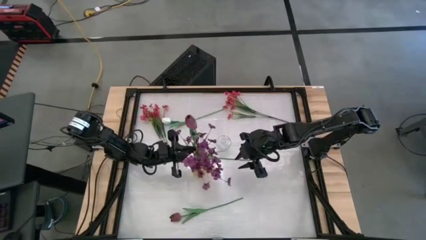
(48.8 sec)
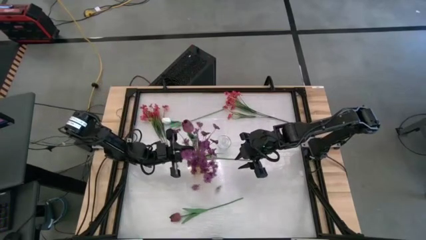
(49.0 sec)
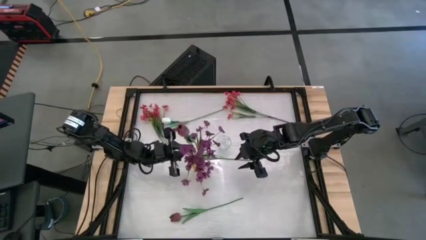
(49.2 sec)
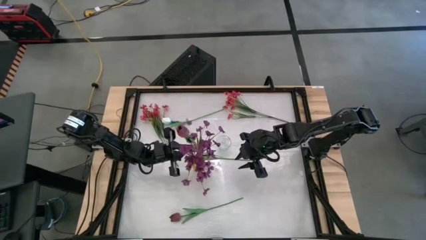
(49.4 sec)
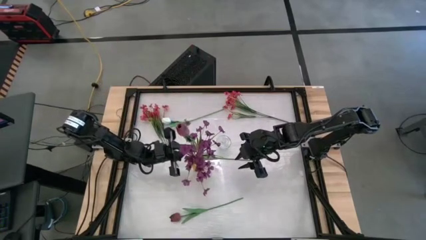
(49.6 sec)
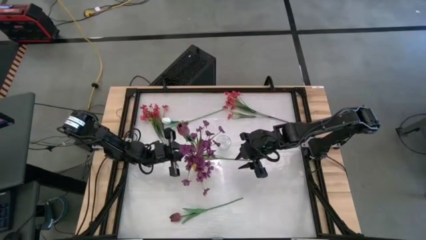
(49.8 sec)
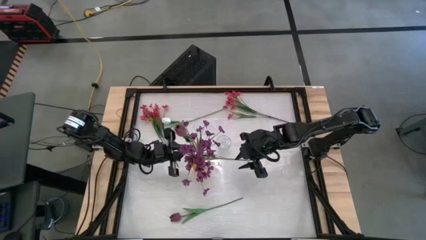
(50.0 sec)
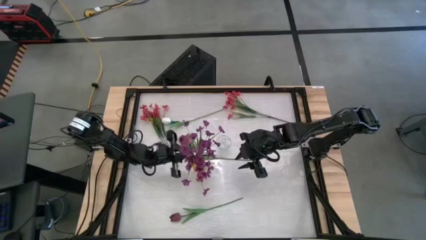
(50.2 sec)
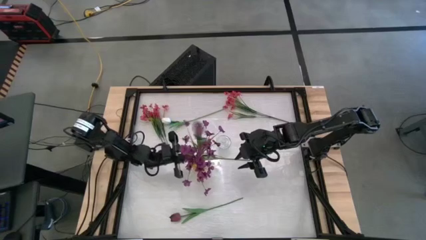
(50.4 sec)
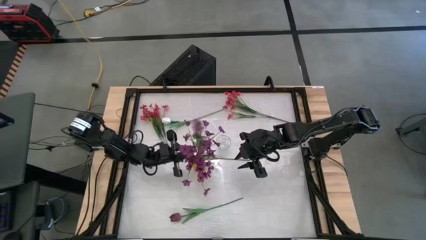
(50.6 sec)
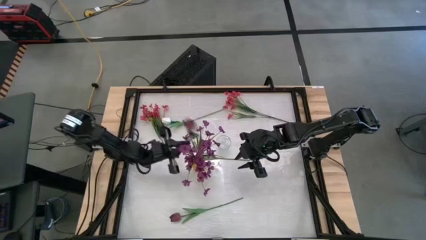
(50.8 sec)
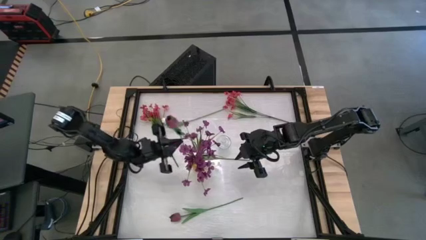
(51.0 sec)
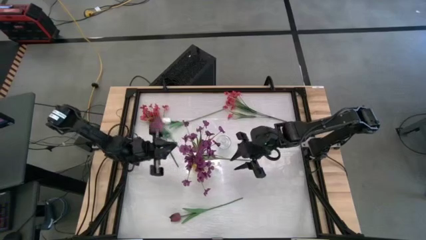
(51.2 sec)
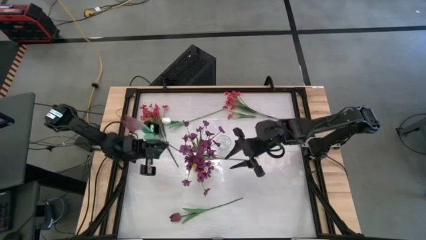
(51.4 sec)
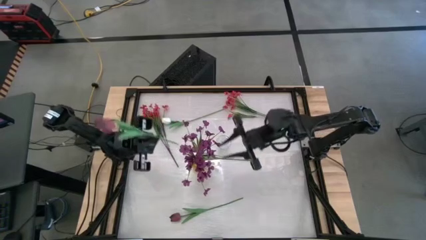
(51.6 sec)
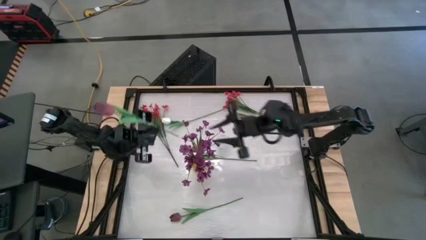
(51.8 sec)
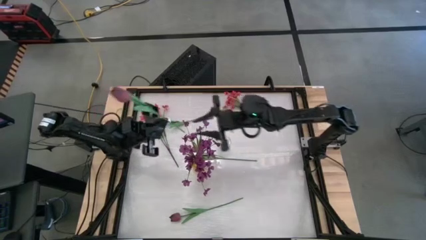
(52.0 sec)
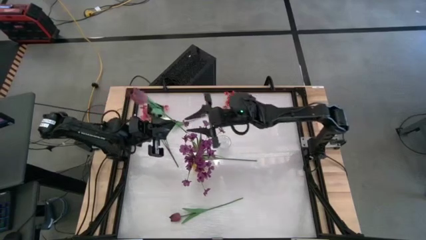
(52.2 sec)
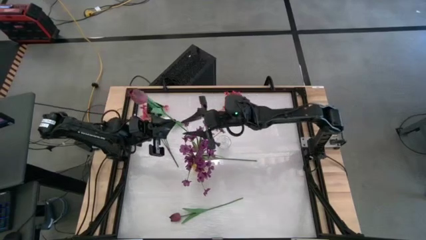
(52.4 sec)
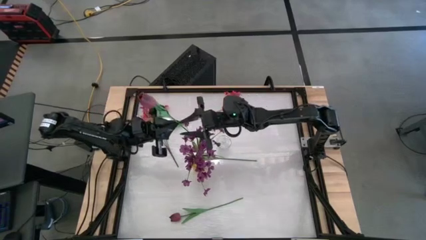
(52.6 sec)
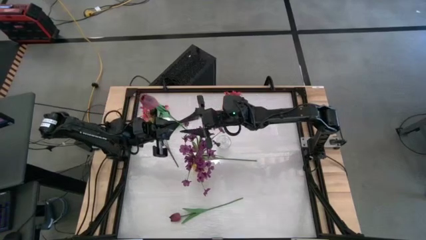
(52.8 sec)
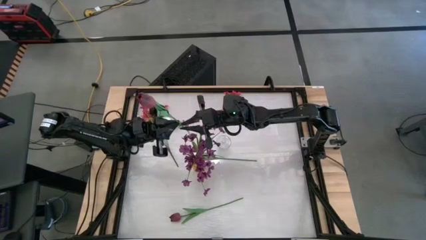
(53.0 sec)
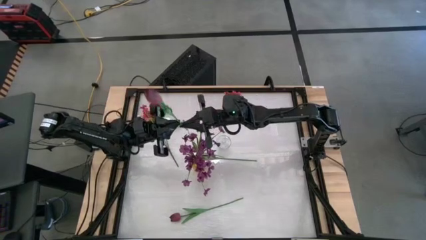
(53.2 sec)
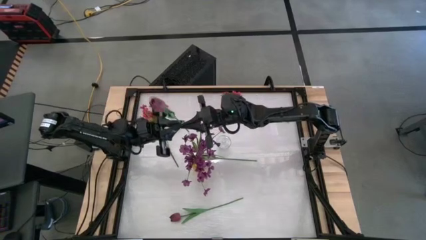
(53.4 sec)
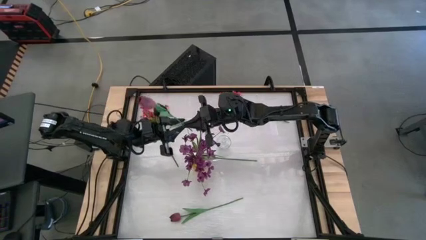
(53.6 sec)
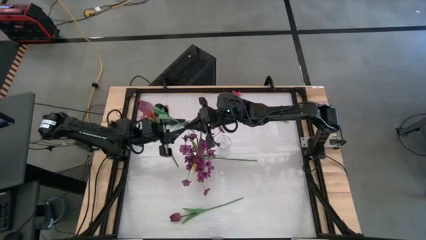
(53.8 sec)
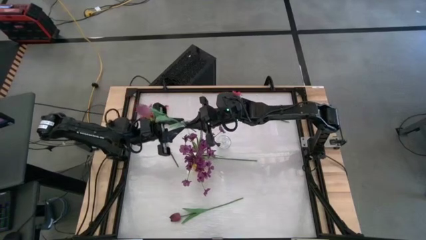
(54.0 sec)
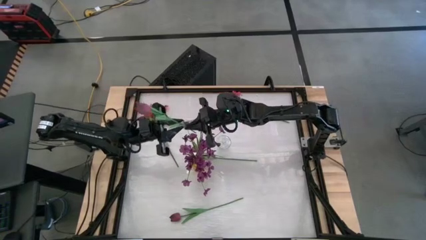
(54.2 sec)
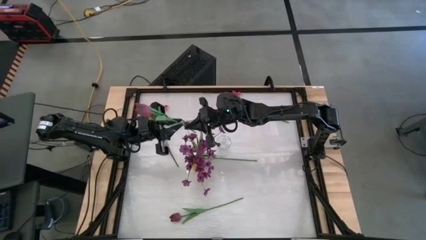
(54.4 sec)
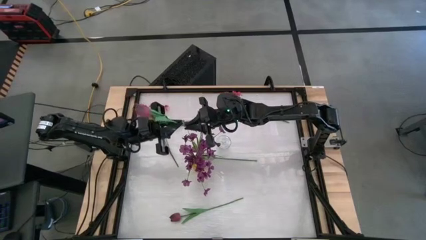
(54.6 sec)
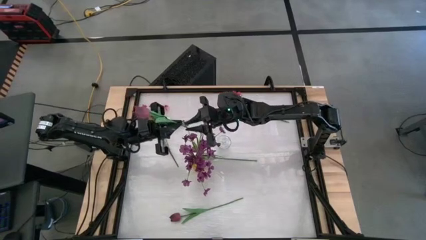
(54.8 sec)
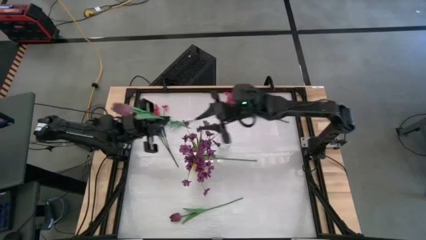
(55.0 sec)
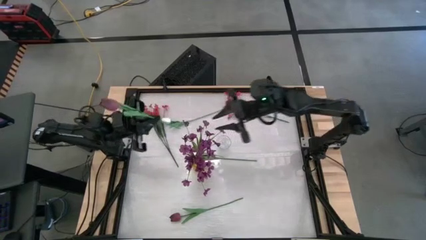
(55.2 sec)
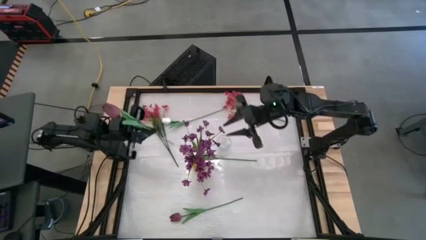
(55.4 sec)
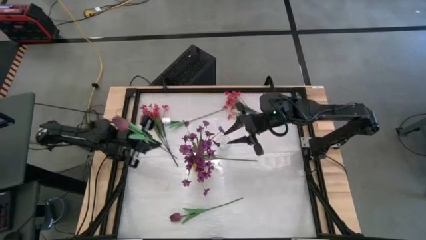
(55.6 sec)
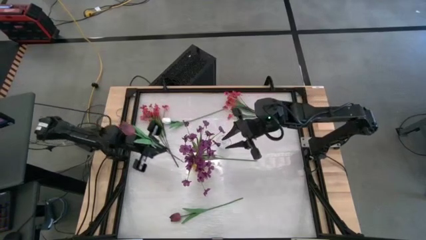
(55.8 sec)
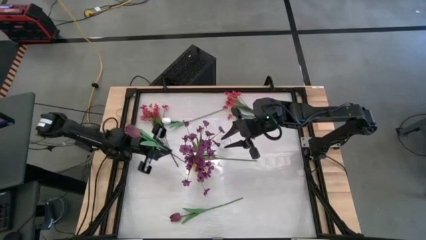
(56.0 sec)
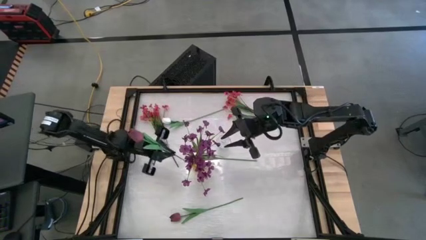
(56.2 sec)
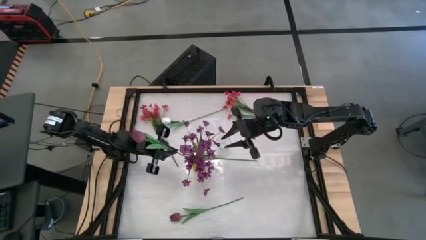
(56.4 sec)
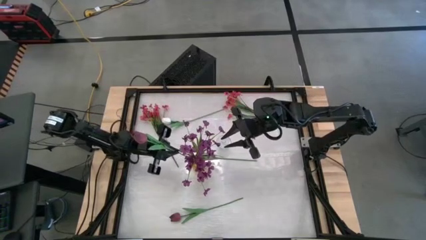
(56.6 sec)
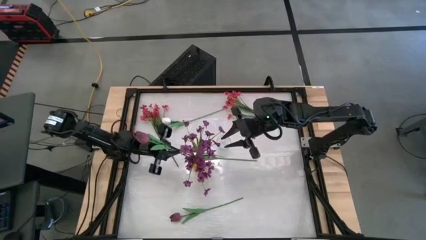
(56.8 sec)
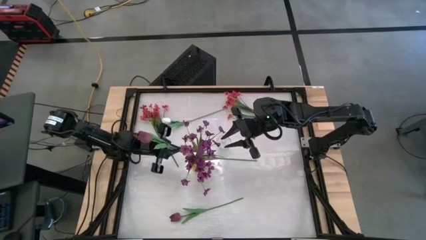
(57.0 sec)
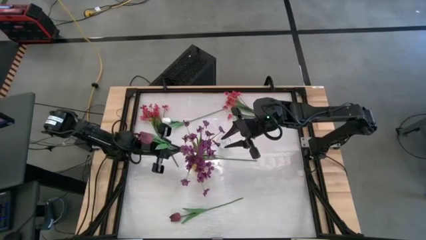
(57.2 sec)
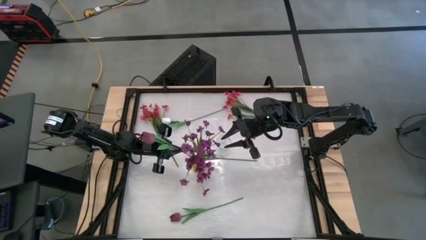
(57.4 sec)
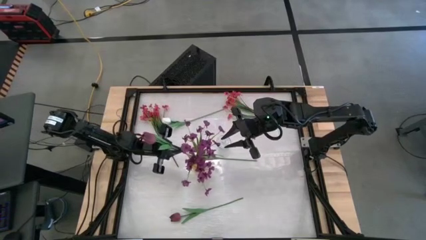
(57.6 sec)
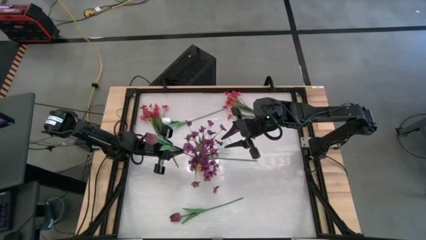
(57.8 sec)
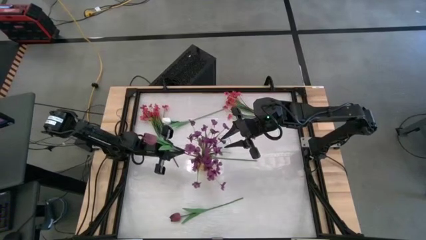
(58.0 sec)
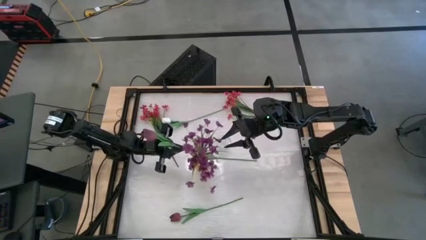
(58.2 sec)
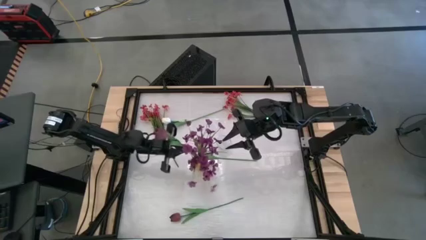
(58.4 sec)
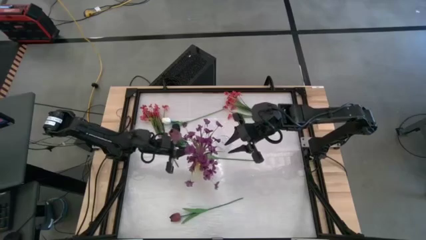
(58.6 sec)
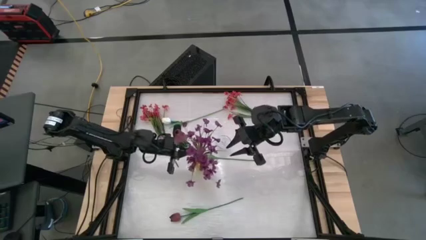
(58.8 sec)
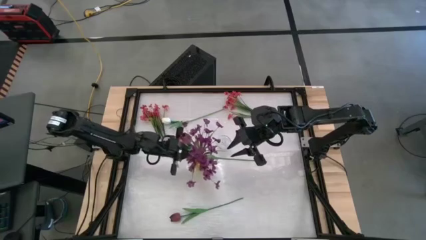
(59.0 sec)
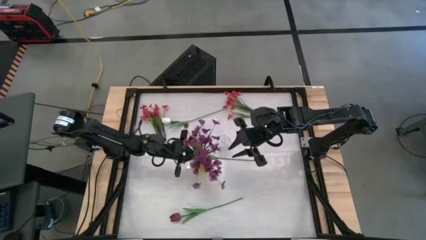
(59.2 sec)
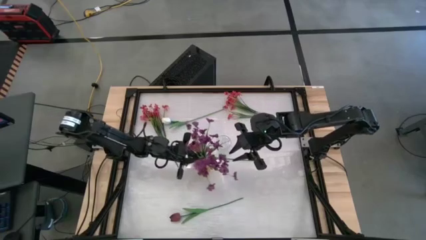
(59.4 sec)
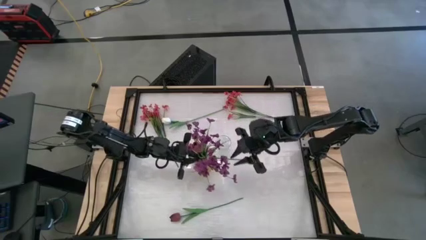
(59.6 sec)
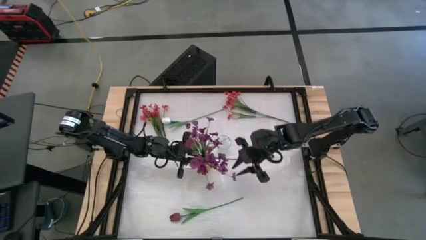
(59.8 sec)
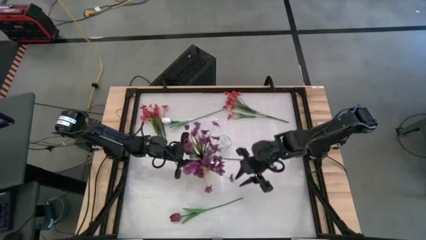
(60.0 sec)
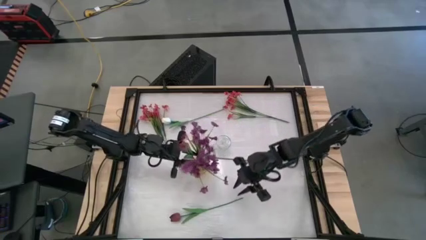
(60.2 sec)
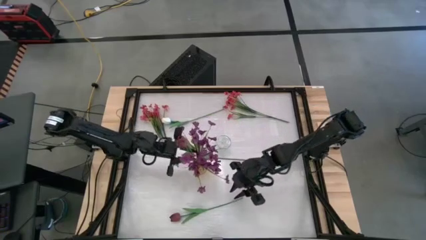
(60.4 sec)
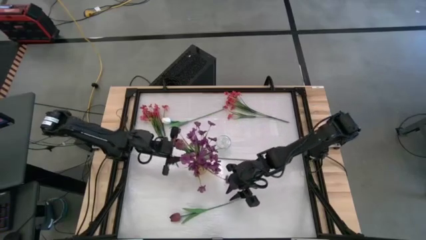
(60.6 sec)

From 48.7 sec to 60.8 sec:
Task: Sort flowers into vase by color
Put the top red tulip into the yellow vase

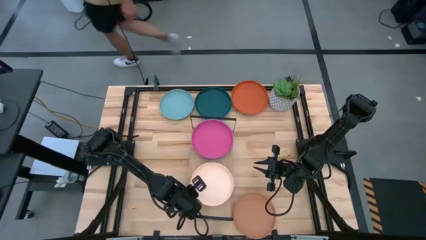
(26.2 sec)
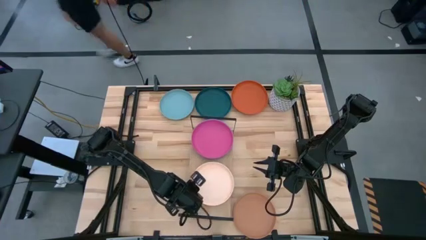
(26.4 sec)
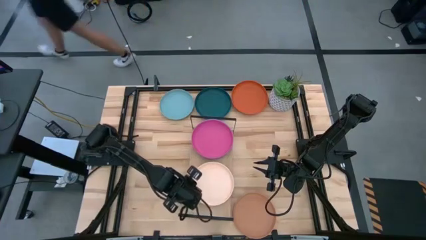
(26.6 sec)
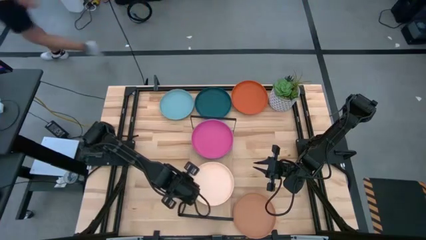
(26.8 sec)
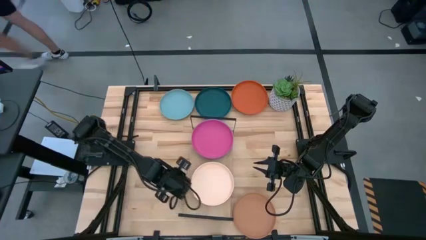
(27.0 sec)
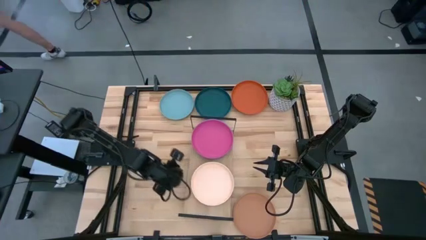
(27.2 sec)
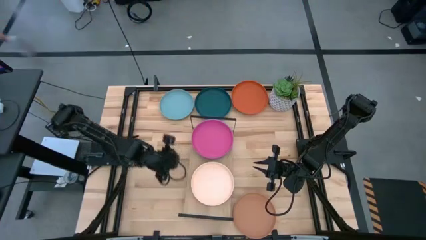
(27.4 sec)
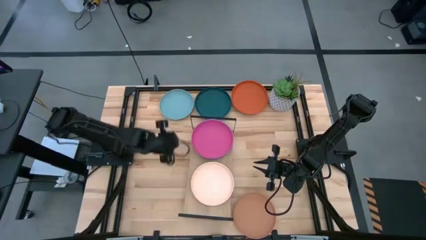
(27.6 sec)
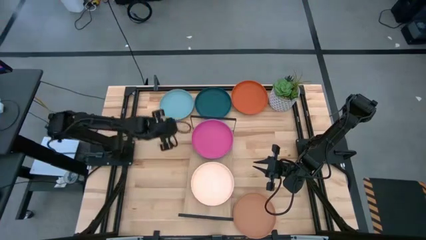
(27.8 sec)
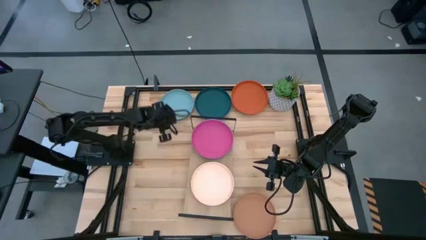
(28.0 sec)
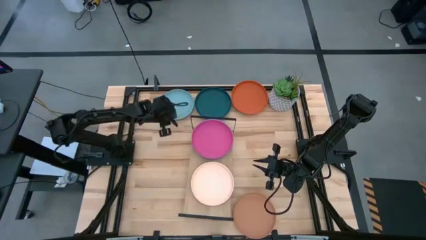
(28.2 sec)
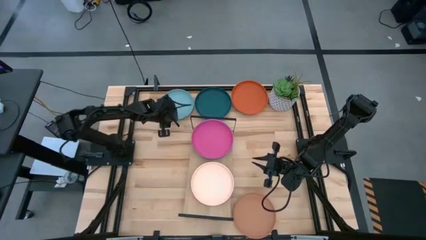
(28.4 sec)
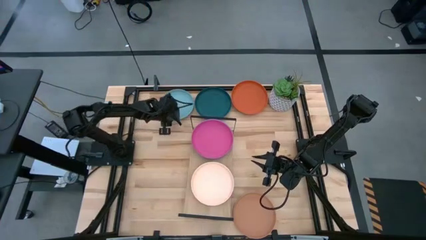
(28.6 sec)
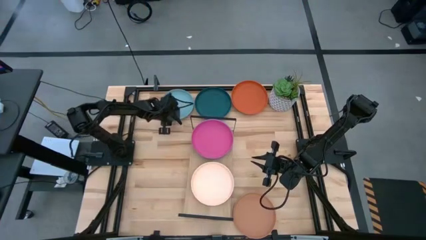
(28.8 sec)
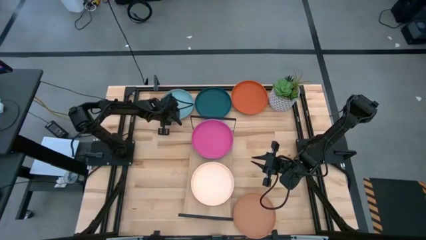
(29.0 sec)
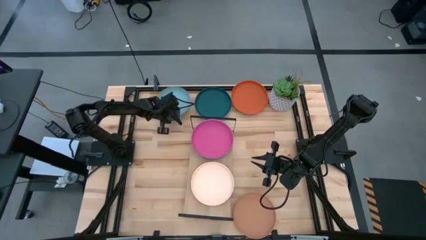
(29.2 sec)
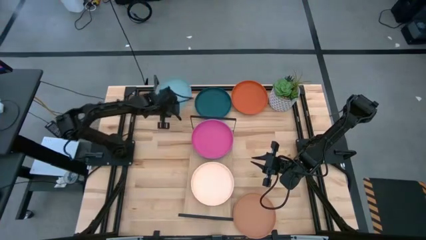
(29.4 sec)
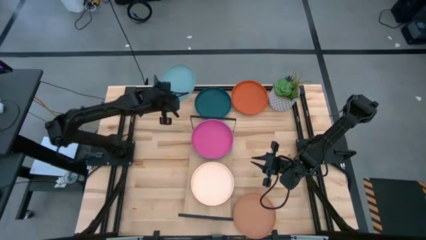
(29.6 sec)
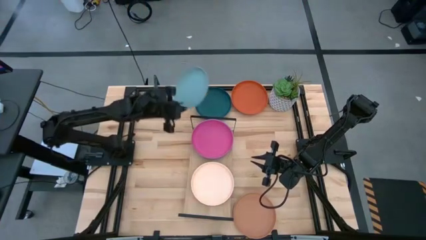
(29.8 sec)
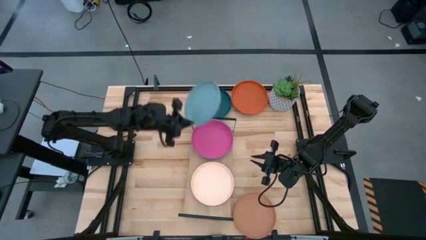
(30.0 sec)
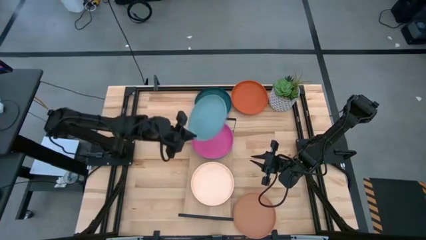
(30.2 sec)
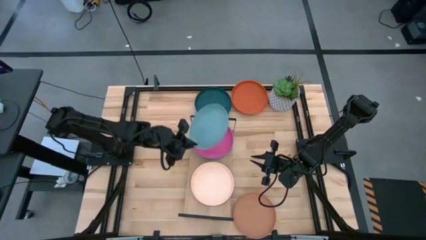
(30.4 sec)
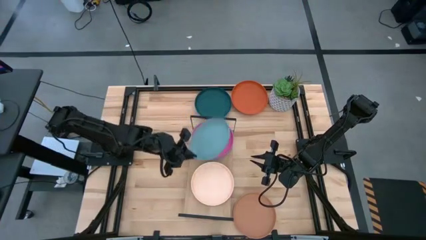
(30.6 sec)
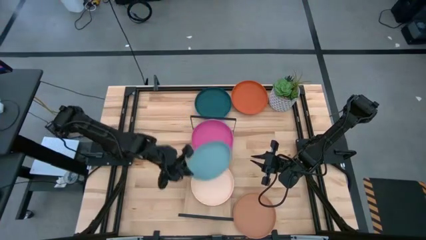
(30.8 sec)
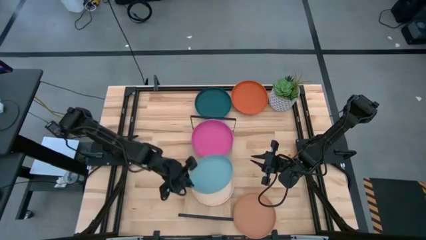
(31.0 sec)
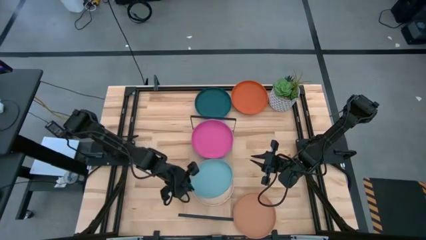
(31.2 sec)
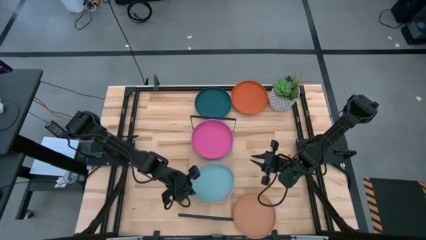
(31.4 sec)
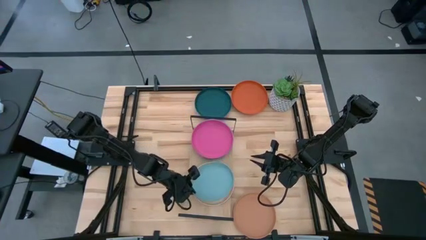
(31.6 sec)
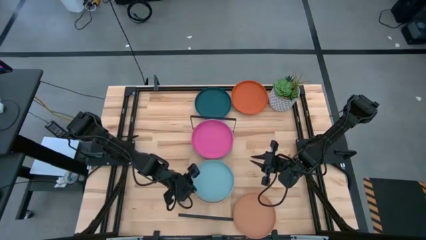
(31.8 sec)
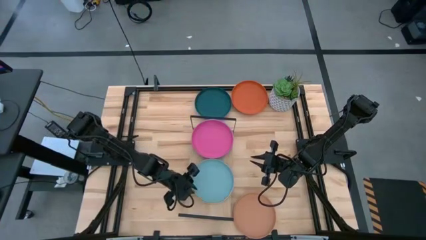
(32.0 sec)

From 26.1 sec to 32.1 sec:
Task: Place and stack plates onto a shelf
Stack the light blue plate on top of the light orange plate on the shelf
